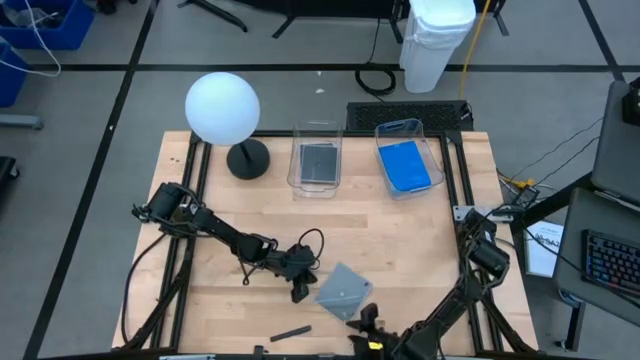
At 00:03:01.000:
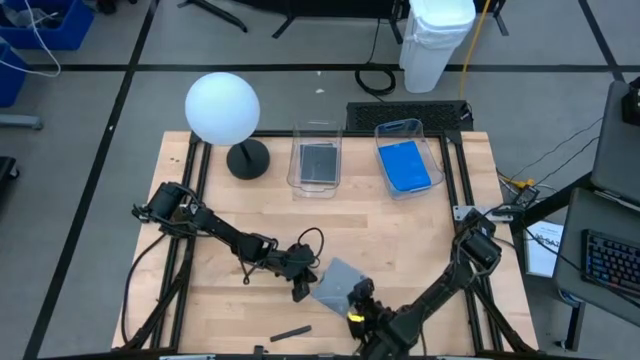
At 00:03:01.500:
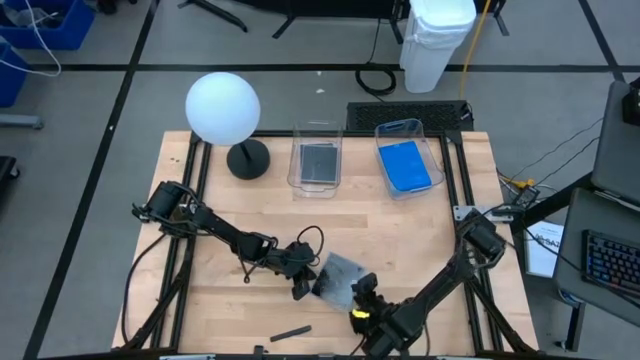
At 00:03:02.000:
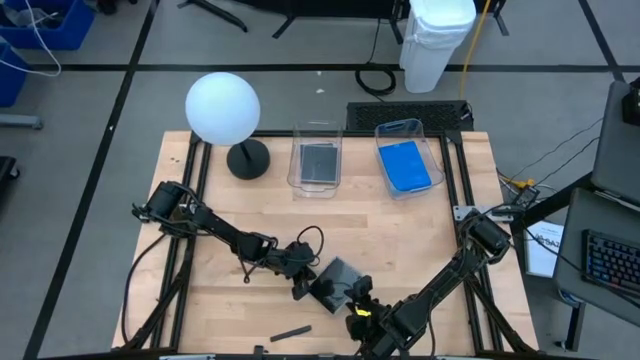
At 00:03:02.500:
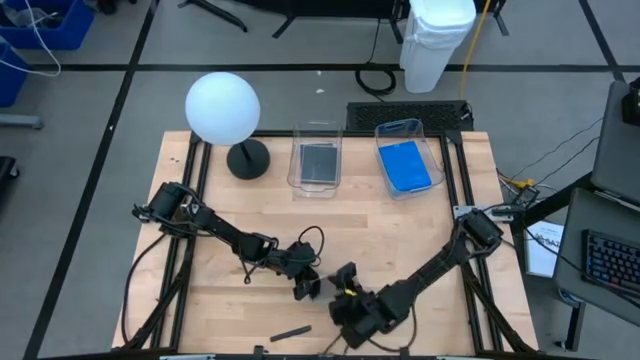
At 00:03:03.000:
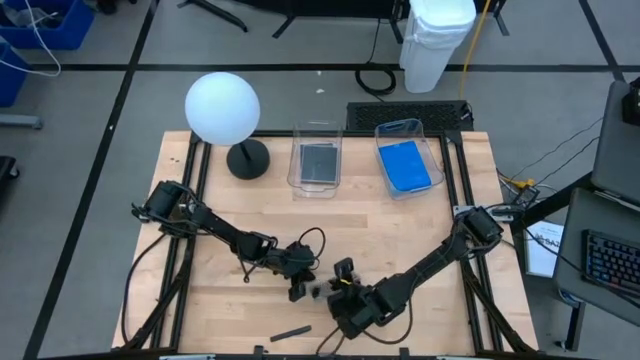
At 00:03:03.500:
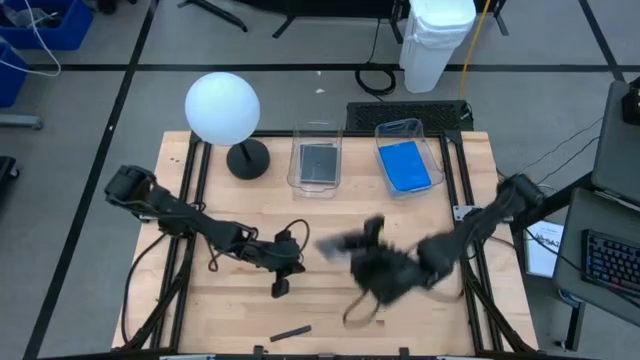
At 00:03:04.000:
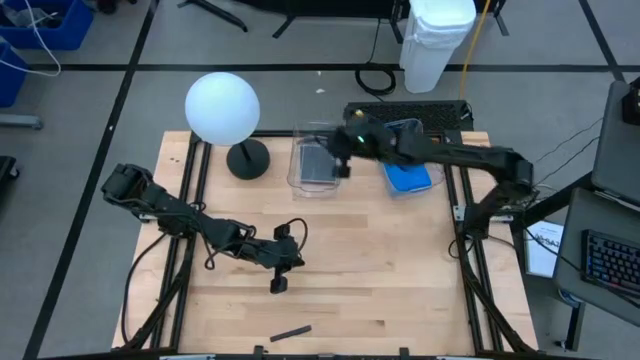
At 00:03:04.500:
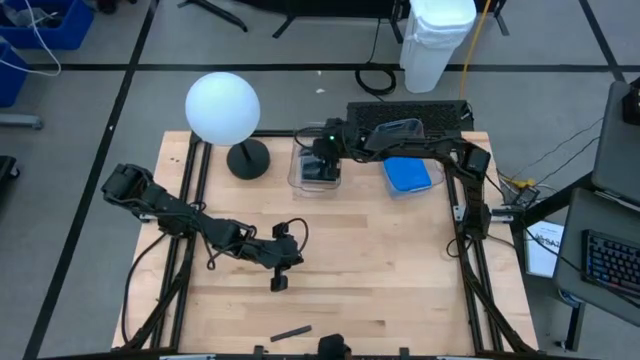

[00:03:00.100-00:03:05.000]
Task: Pick & place jewel cases by type
Put the black CD case into the left transparent bin

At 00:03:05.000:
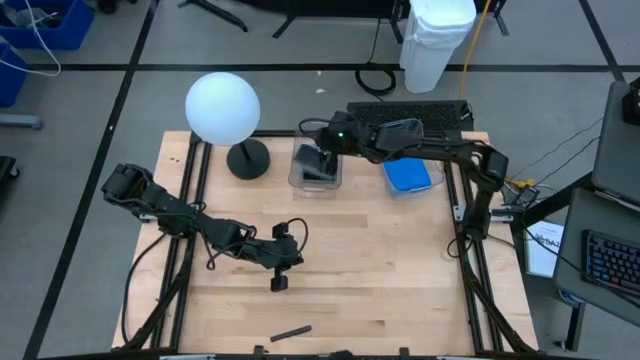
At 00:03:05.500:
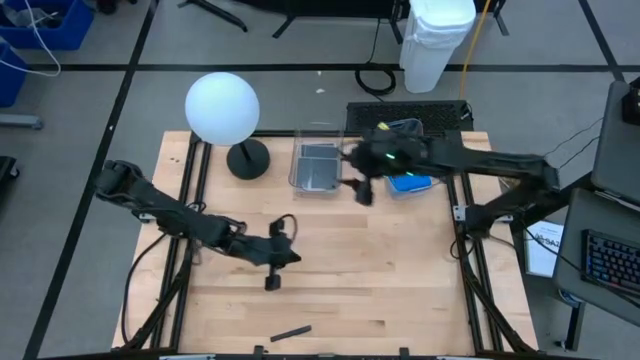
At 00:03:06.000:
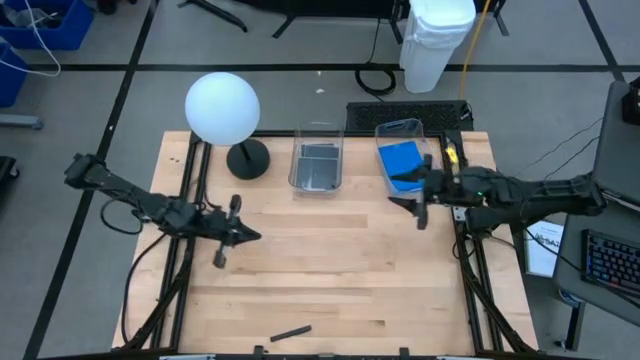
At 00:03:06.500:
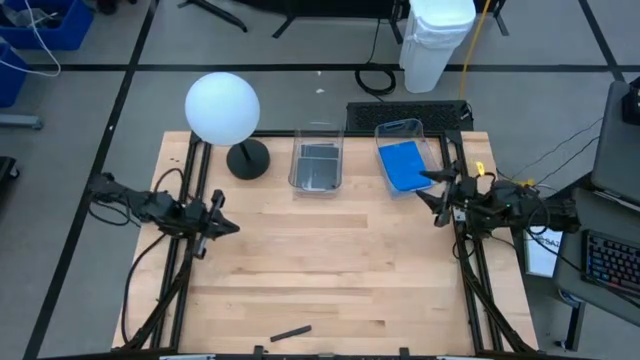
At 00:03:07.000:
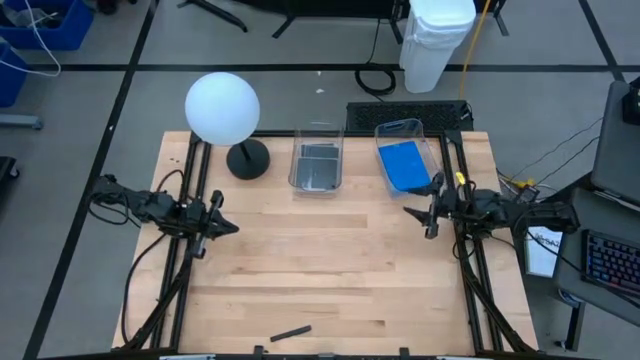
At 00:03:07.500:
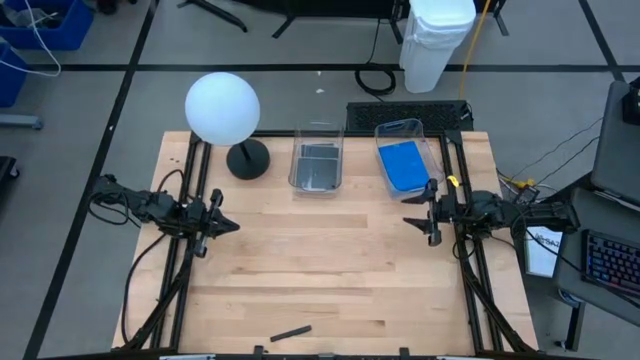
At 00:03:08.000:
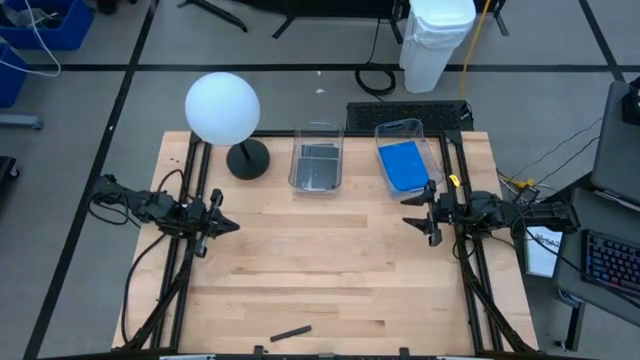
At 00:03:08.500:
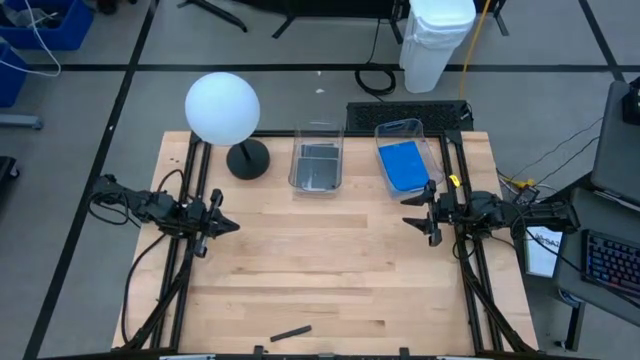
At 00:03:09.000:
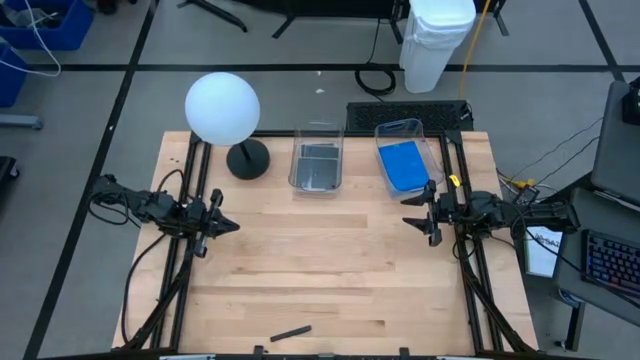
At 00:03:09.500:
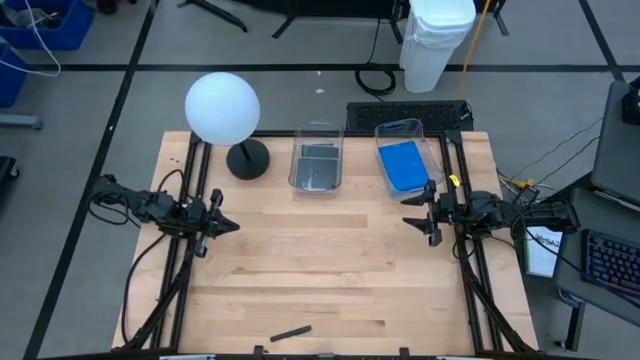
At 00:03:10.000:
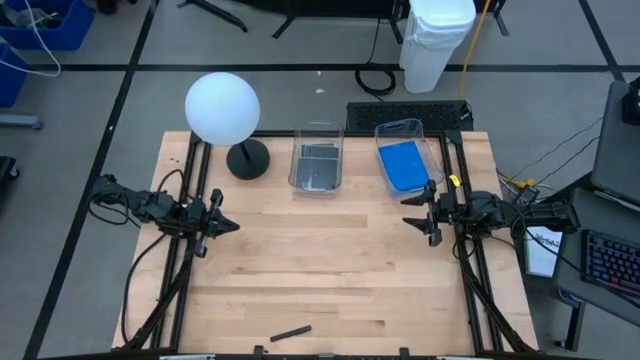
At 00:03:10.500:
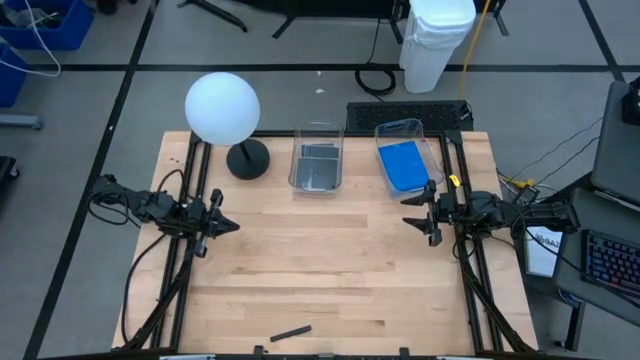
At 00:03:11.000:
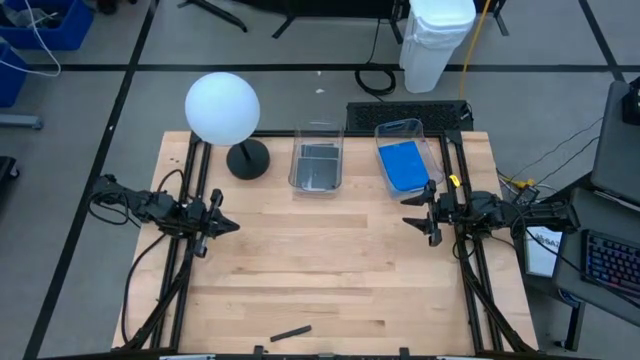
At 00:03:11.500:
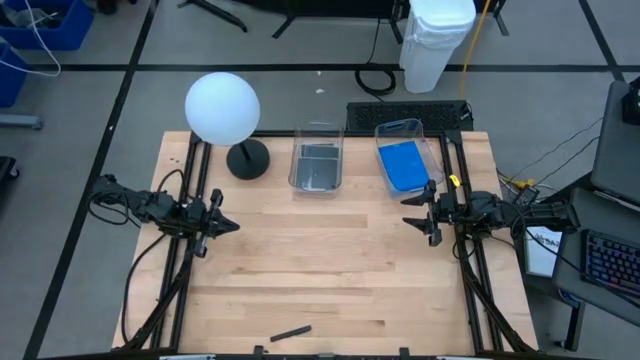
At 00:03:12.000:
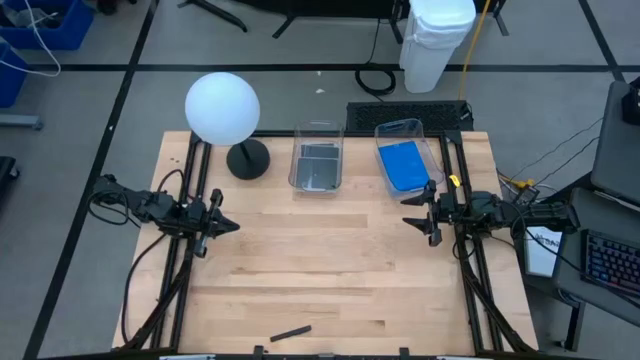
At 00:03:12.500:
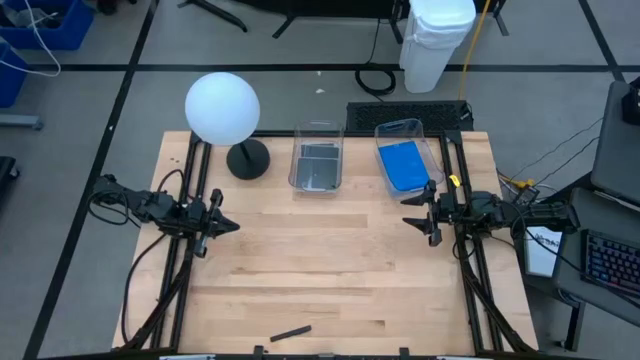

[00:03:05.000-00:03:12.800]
Return to Home Position

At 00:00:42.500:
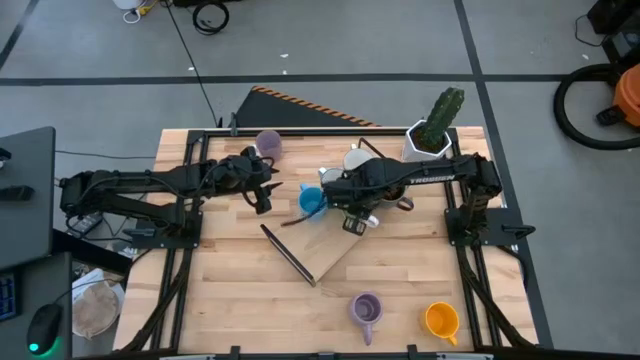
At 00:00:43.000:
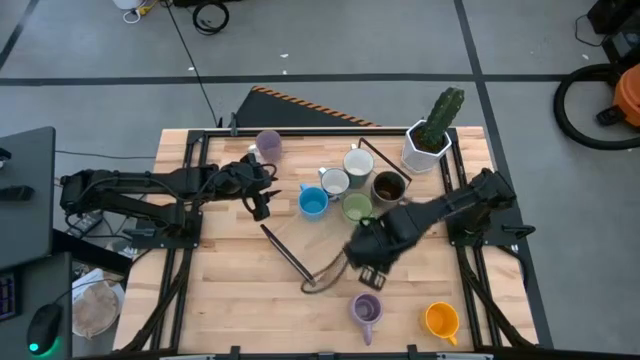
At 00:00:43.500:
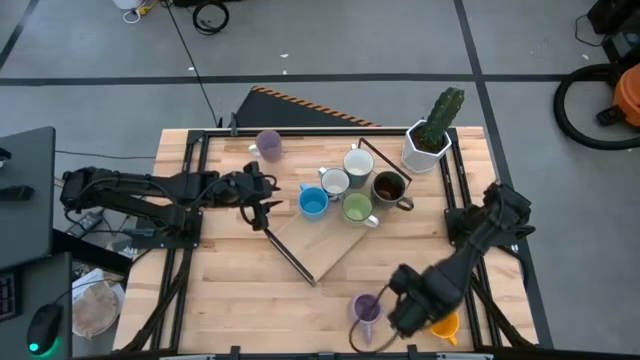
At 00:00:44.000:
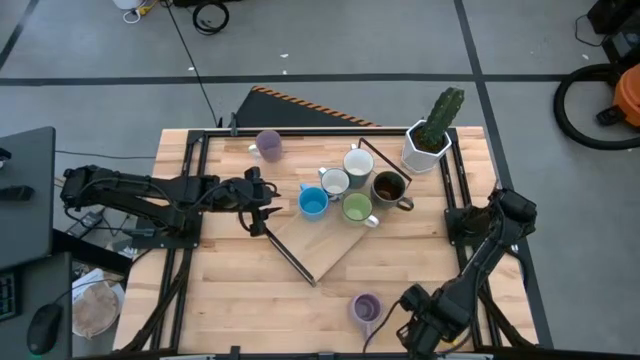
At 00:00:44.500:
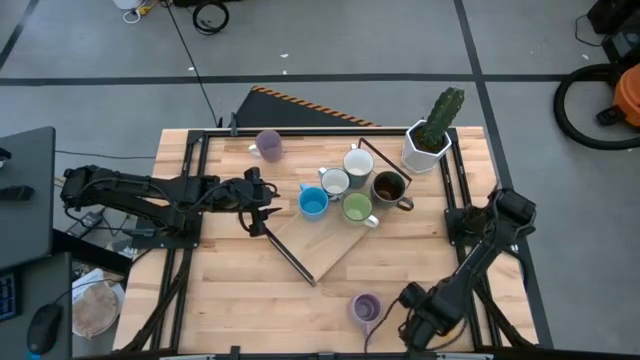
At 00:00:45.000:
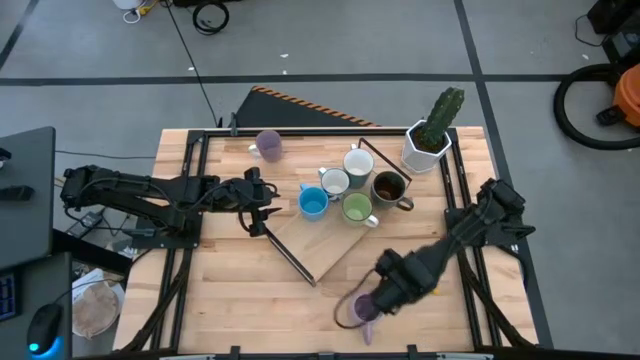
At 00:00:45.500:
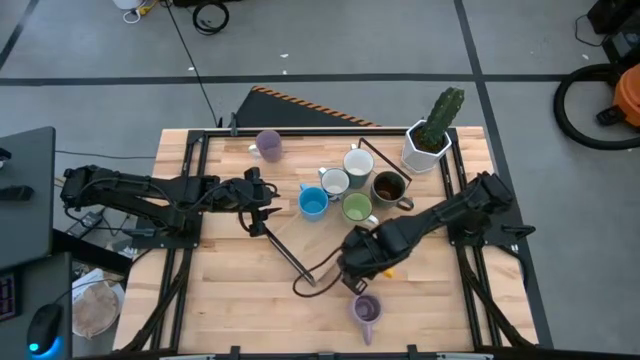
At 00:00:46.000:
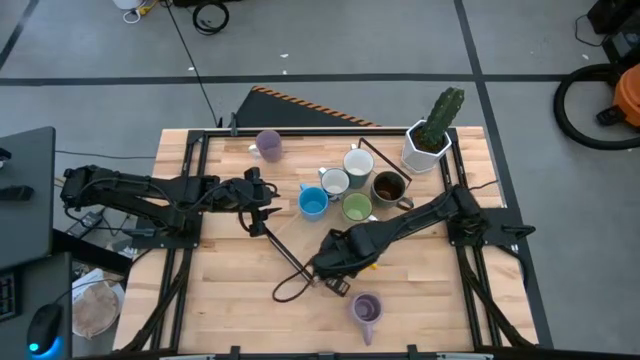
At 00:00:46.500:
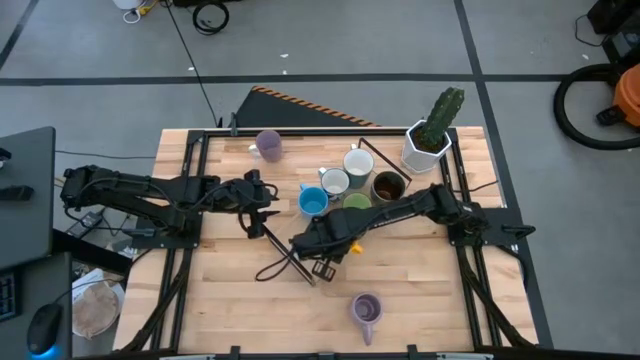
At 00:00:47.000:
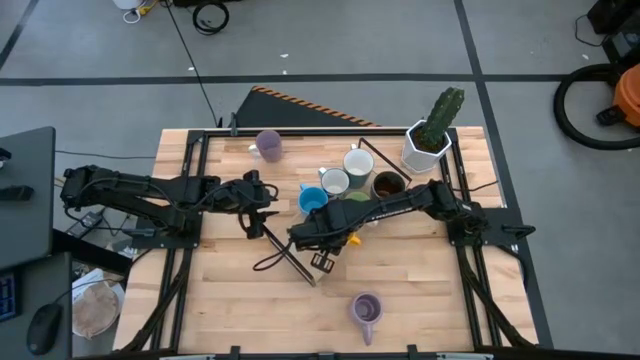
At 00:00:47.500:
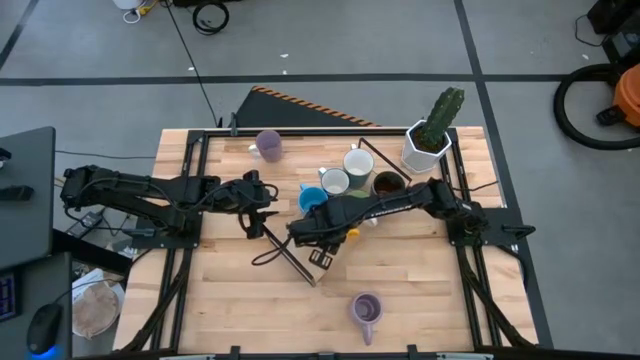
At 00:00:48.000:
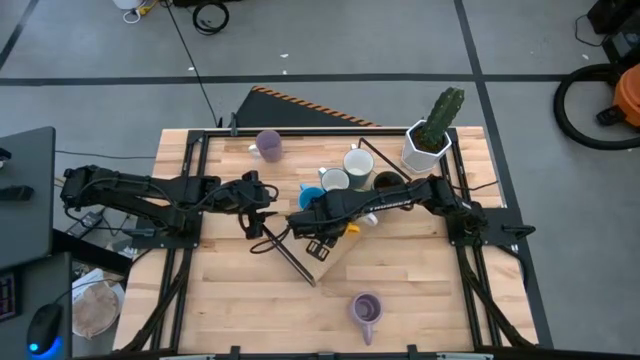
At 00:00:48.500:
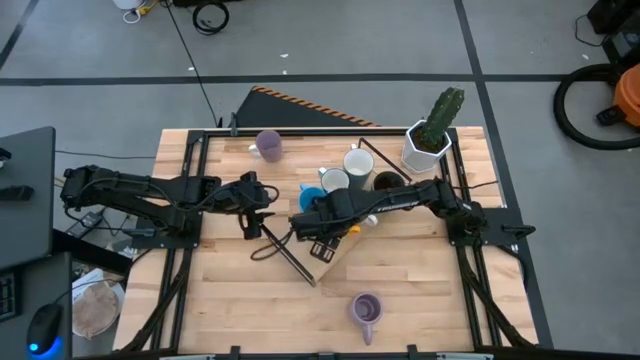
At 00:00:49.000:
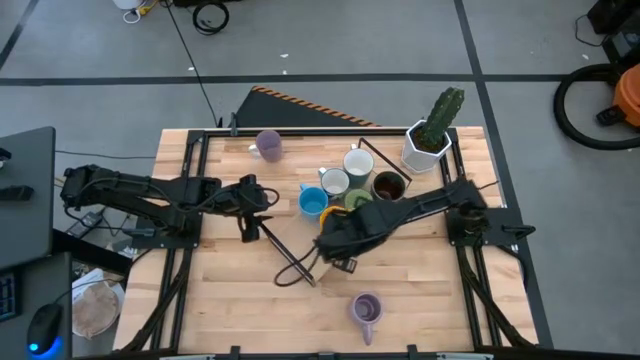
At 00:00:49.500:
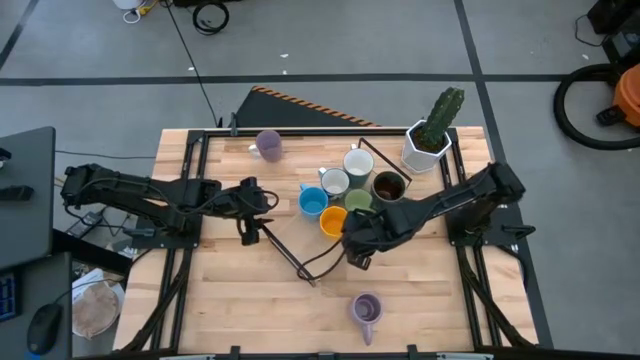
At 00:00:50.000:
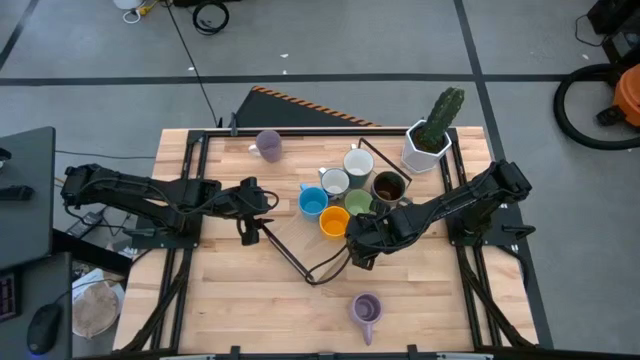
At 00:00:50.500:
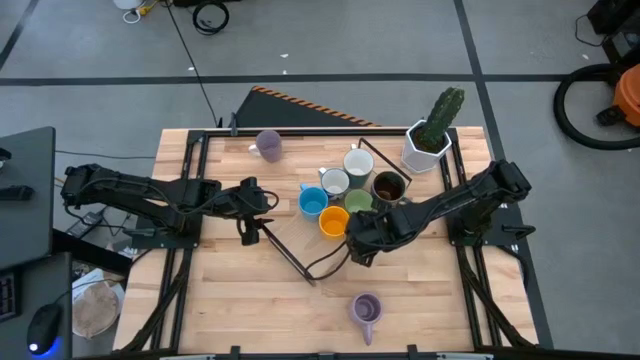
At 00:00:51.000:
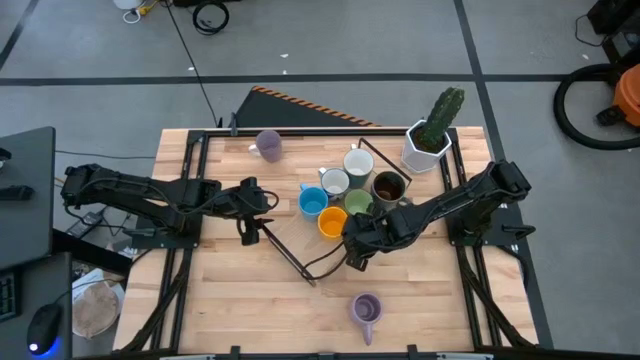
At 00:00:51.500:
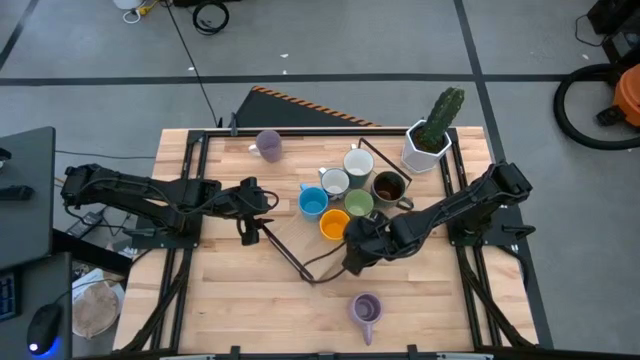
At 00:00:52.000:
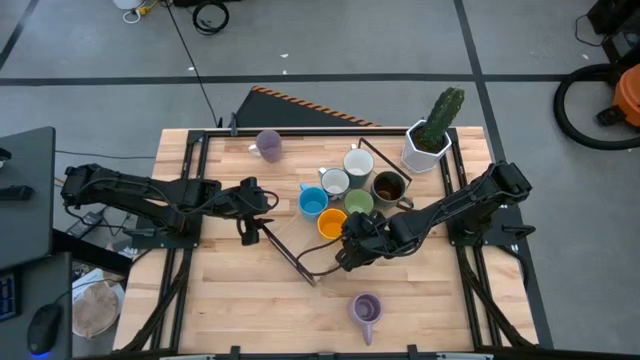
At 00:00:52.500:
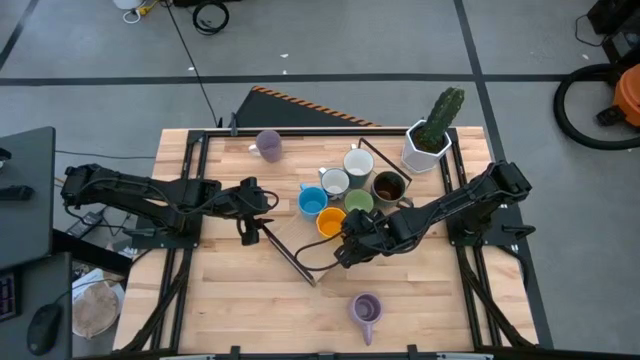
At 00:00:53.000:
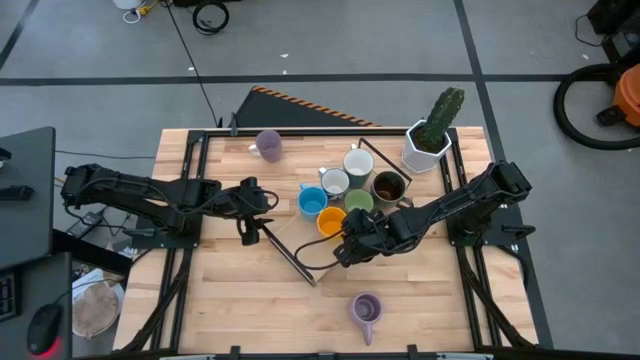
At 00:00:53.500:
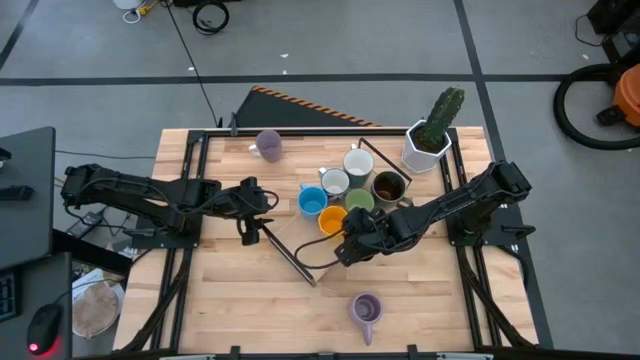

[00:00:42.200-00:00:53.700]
Task: Place coffee mugs
Put the yellow mug on the shelf
